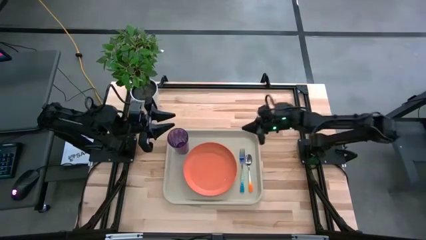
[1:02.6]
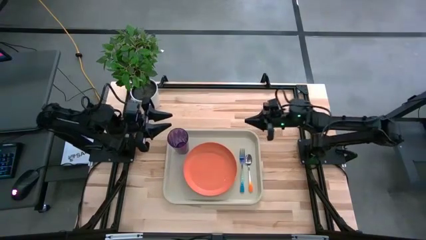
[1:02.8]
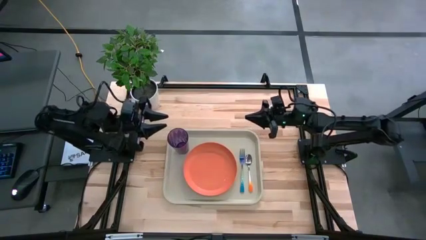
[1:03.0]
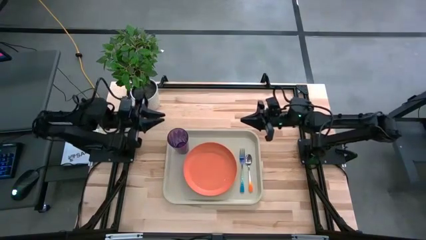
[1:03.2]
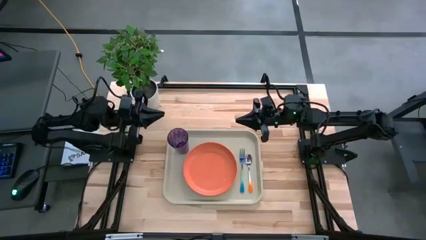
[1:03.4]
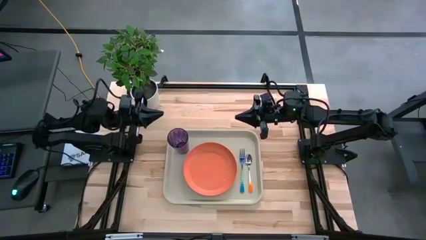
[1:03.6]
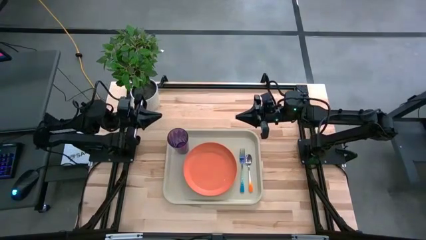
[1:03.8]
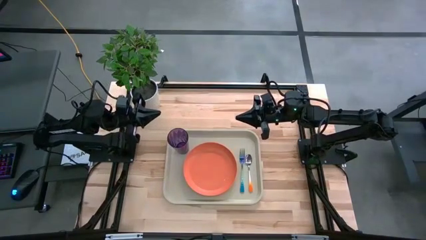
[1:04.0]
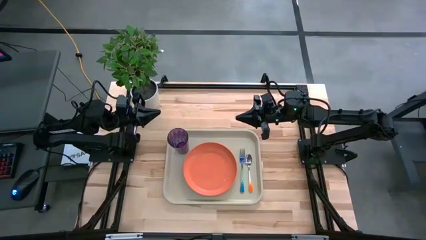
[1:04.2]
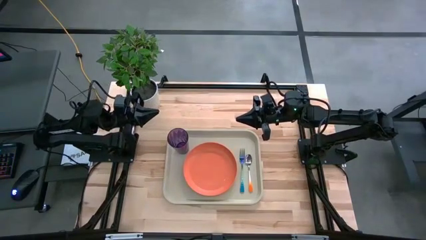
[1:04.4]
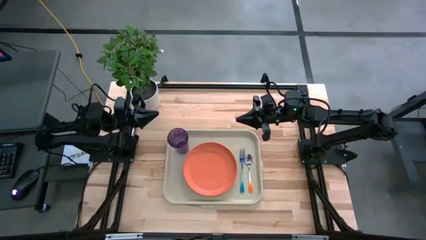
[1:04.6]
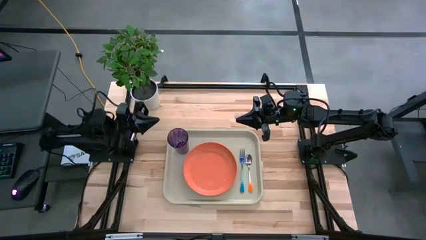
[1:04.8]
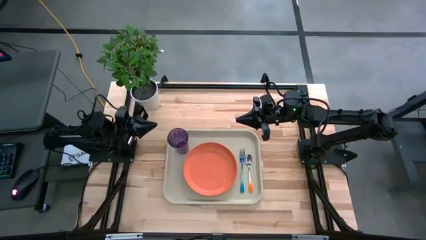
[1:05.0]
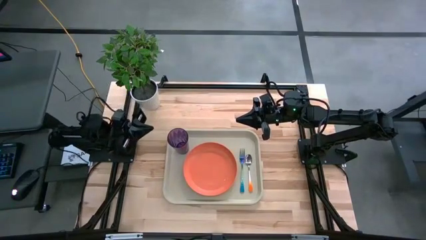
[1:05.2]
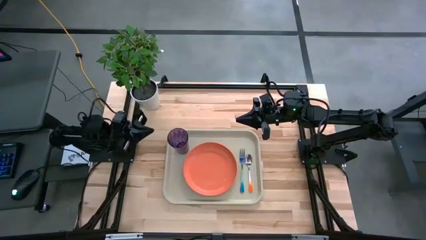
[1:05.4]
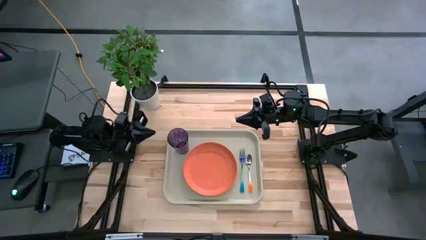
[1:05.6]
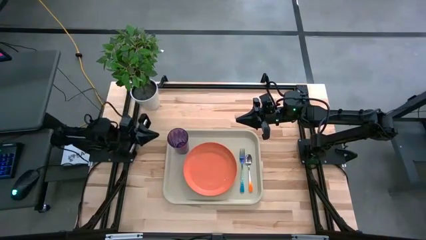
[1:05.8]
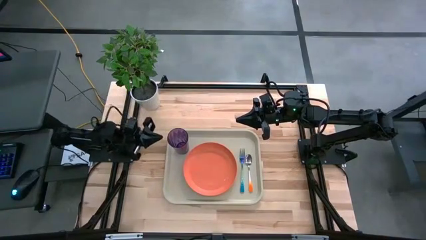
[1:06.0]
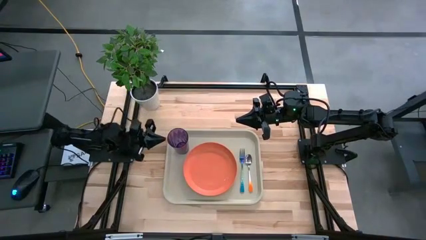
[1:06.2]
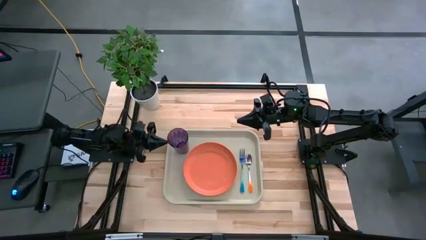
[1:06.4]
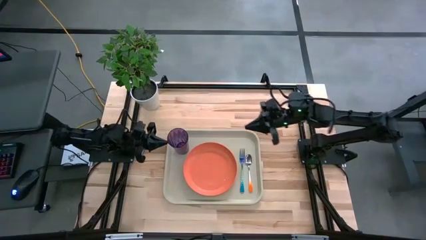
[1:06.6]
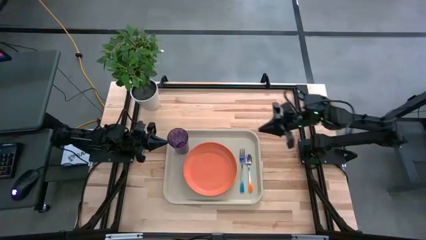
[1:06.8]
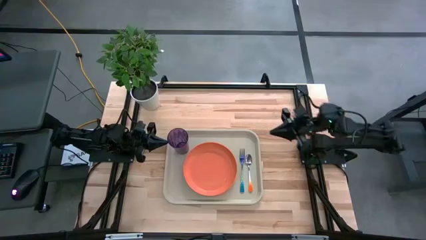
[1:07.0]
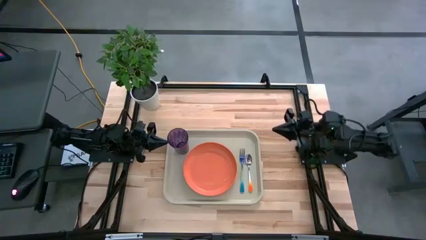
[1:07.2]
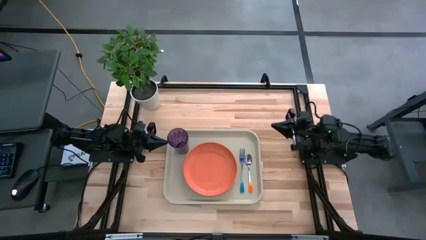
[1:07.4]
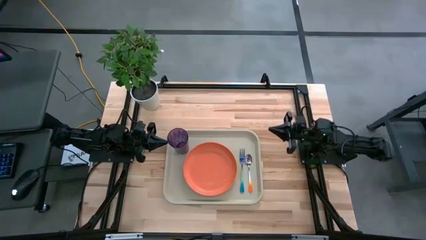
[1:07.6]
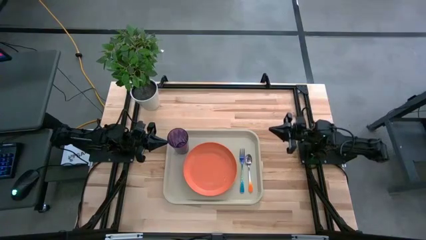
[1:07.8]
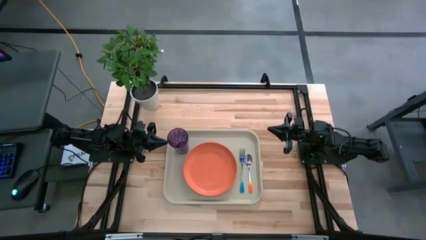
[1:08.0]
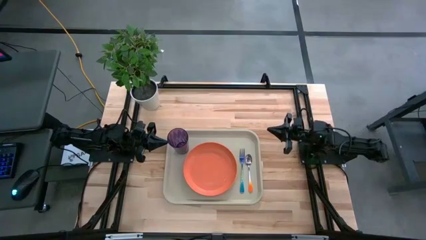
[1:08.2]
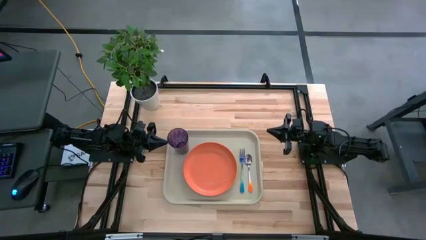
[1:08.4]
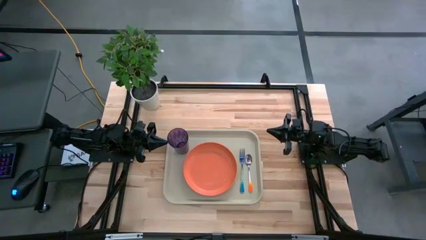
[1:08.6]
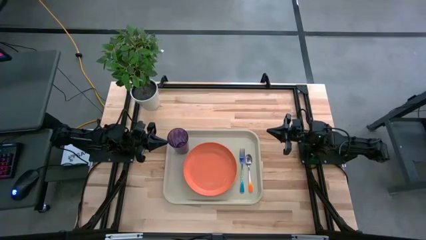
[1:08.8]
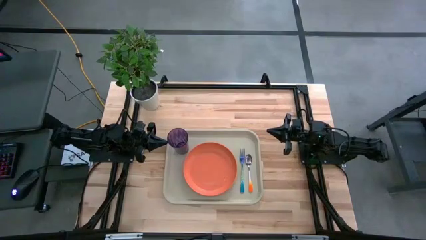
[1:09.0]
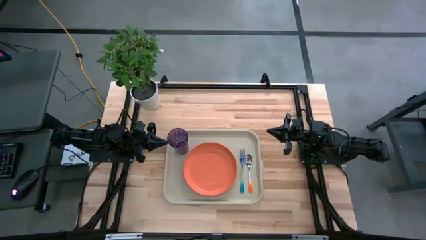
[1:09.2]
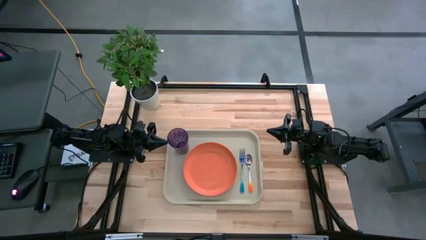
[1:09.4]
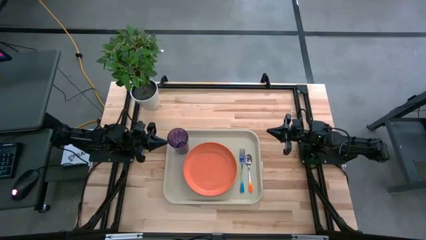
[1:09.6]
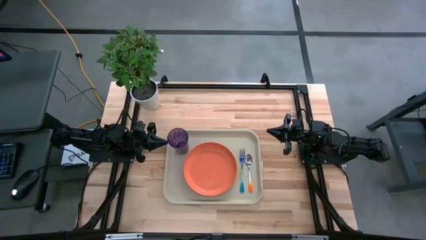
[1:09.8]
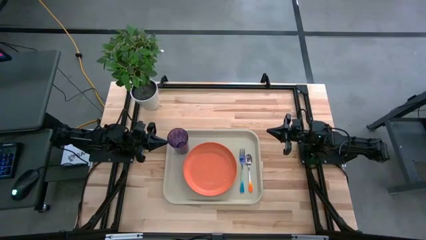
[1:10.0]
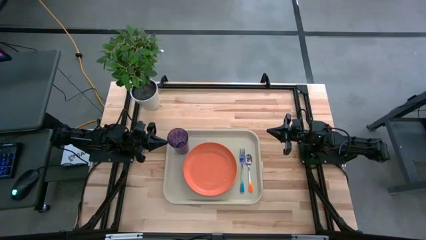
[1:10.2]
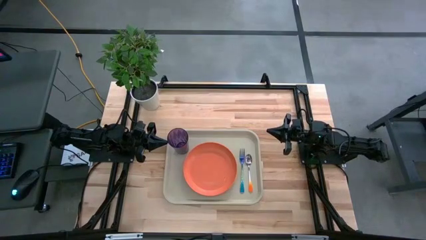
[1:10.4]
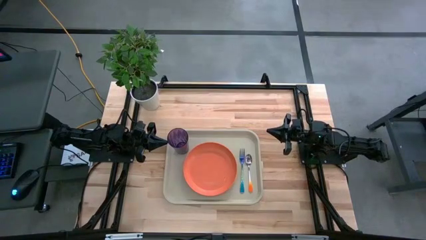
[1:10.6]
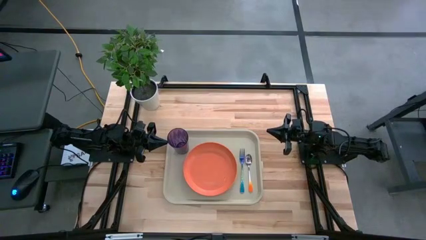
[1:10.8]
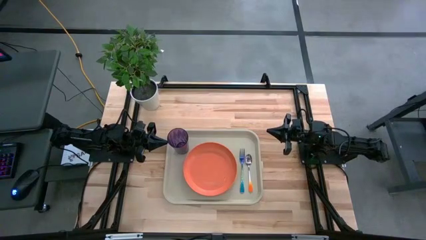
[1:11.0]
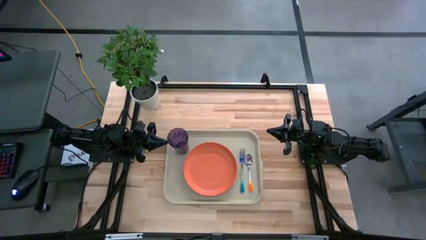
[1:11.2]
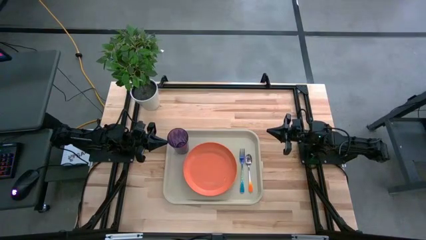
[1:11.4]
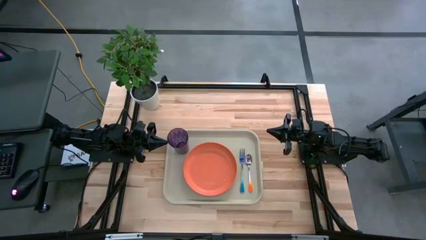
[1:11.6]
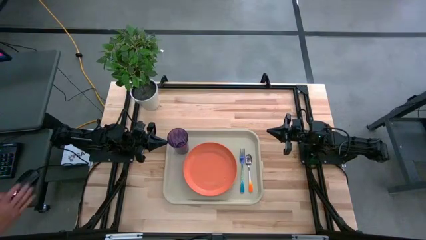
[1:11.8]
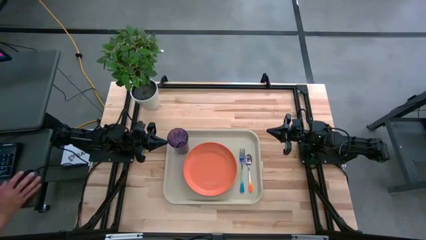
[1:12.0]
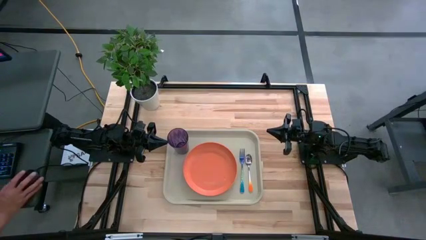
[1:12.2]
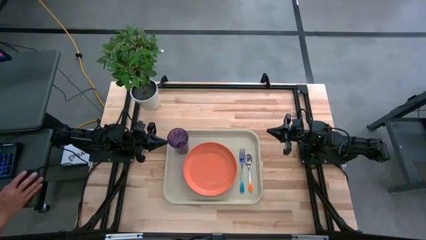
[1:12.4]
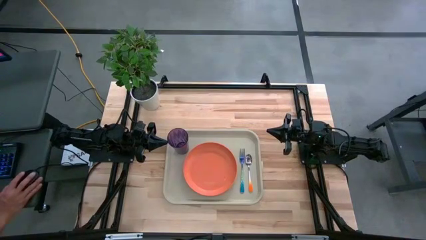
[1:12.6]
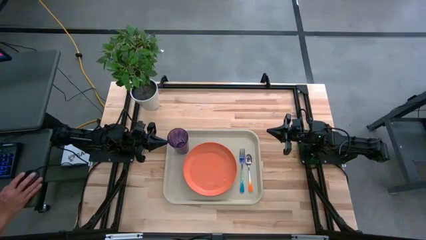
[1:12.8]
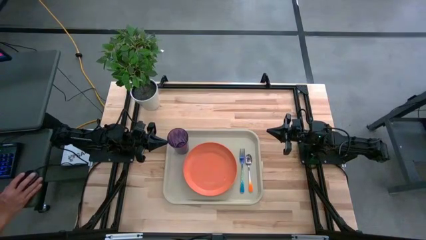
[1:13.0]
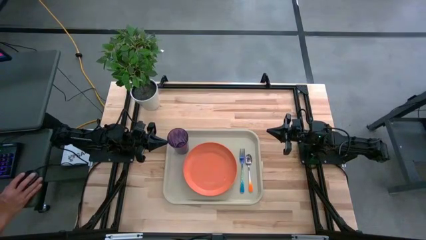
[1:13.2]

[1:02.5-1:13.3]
Task: Pick and place plate/cup/fork/spoon on tray
Return to Home Position

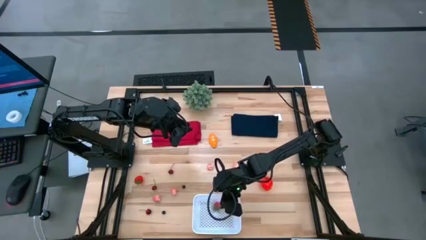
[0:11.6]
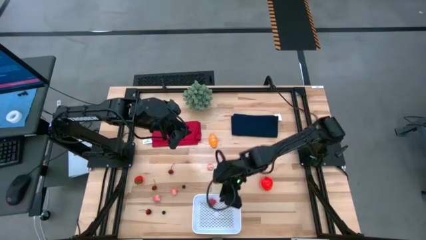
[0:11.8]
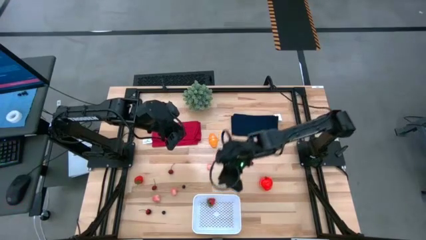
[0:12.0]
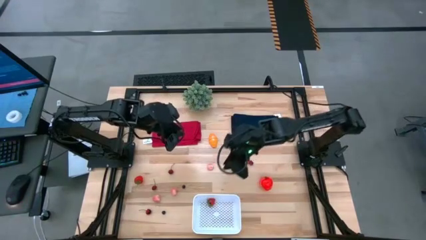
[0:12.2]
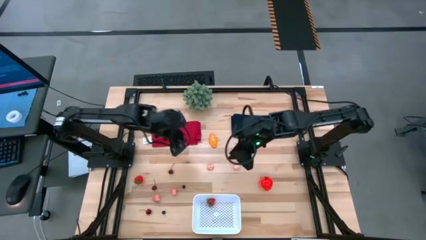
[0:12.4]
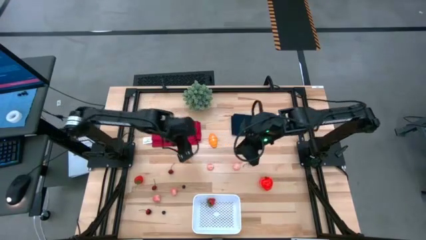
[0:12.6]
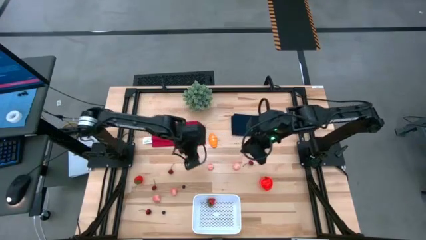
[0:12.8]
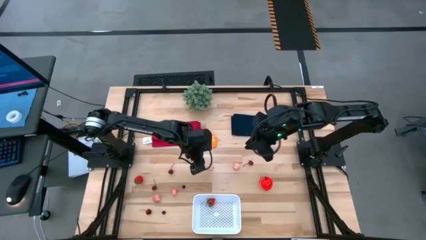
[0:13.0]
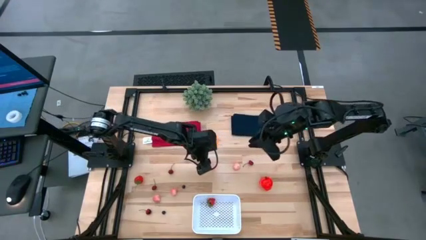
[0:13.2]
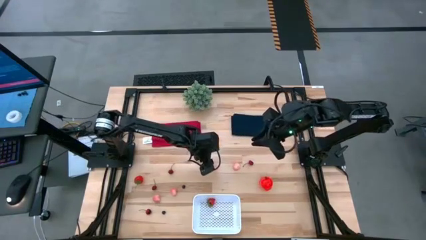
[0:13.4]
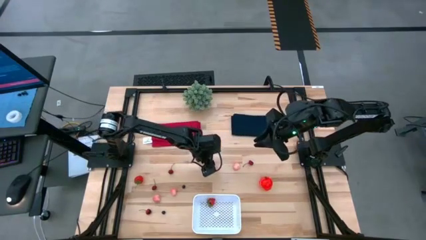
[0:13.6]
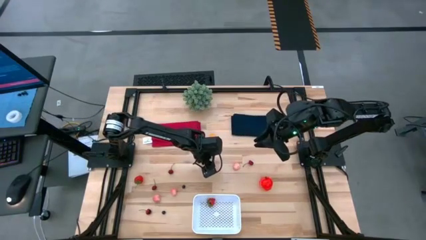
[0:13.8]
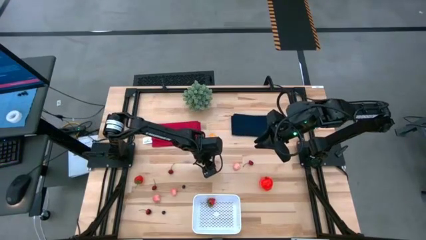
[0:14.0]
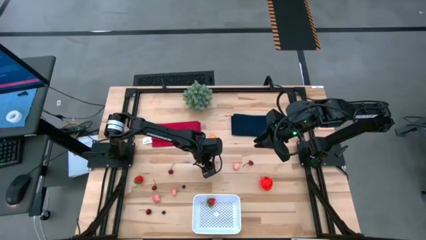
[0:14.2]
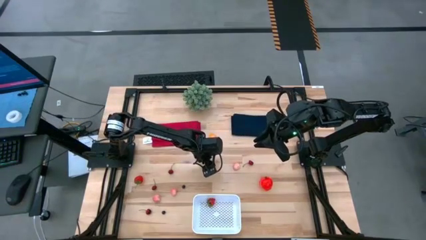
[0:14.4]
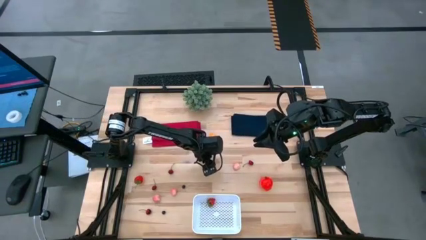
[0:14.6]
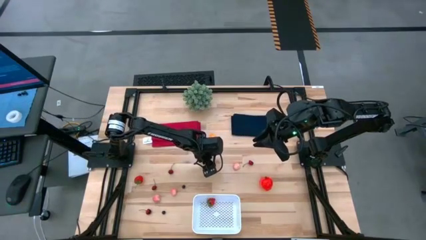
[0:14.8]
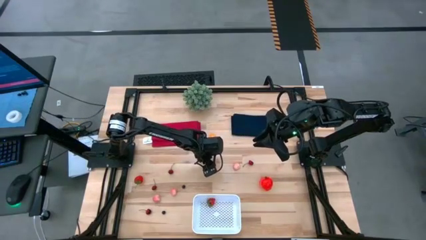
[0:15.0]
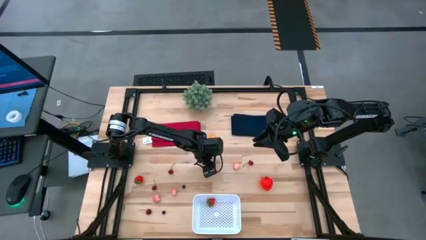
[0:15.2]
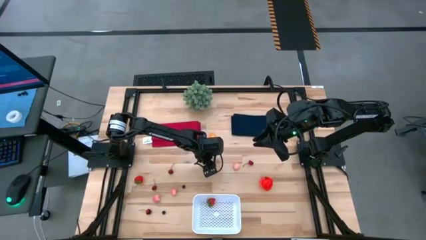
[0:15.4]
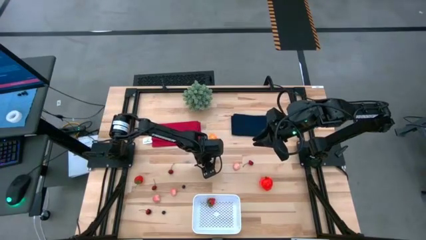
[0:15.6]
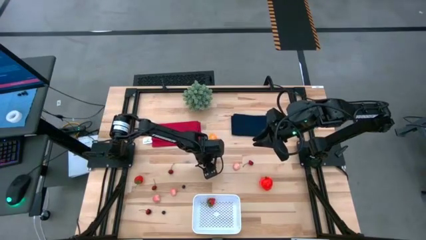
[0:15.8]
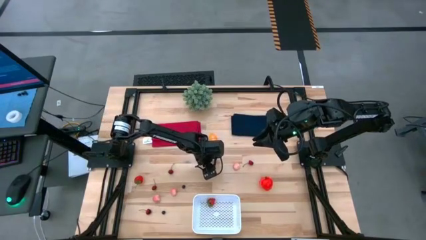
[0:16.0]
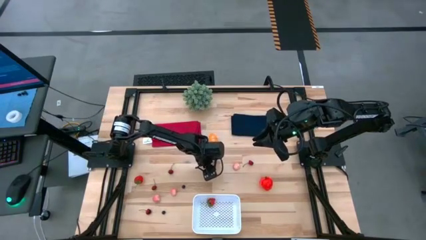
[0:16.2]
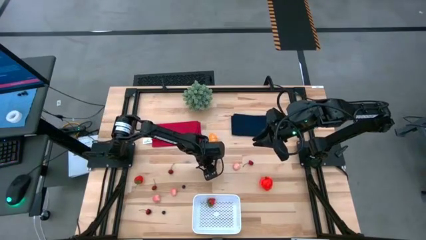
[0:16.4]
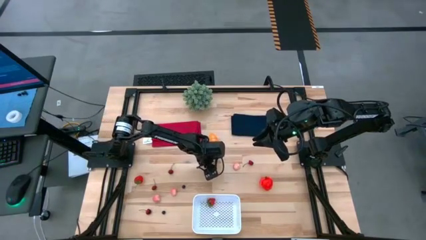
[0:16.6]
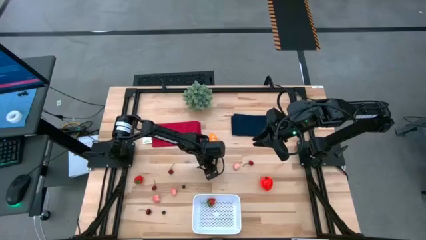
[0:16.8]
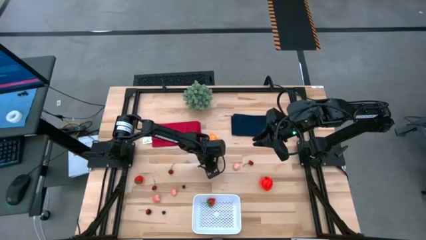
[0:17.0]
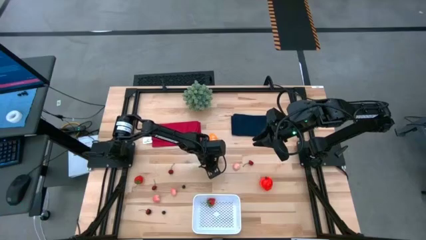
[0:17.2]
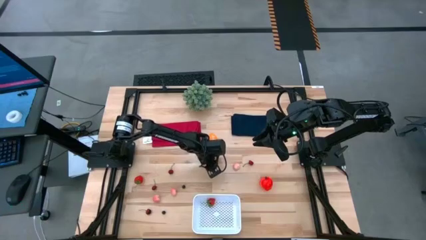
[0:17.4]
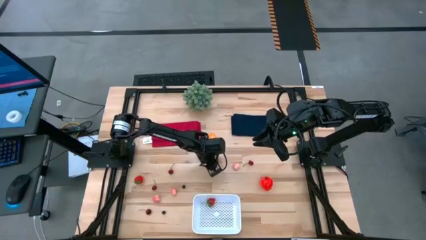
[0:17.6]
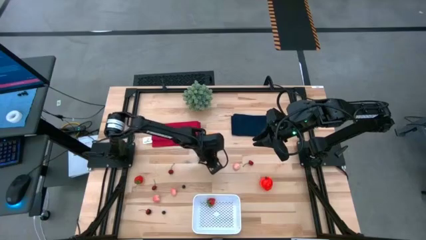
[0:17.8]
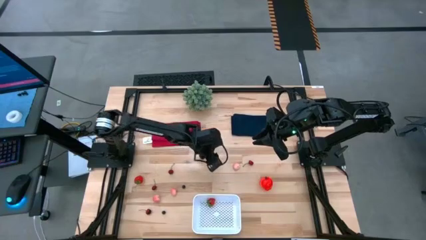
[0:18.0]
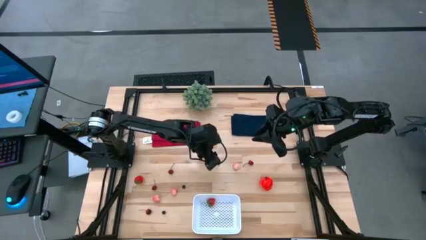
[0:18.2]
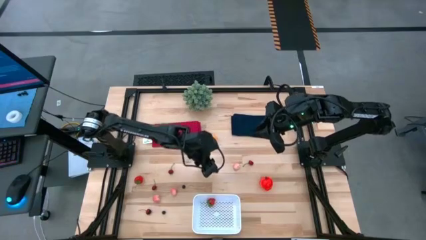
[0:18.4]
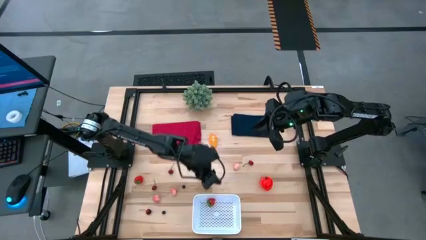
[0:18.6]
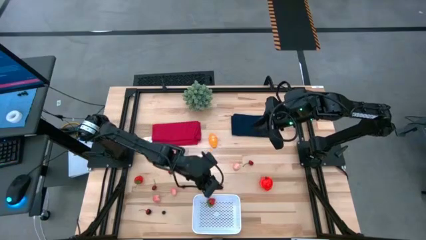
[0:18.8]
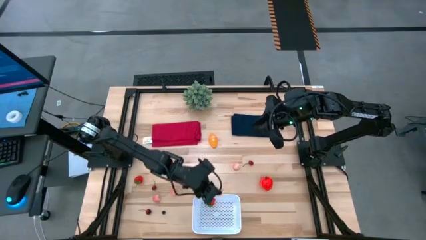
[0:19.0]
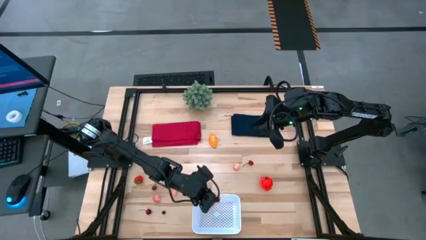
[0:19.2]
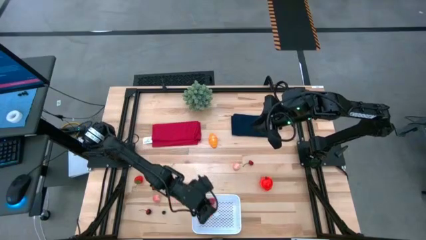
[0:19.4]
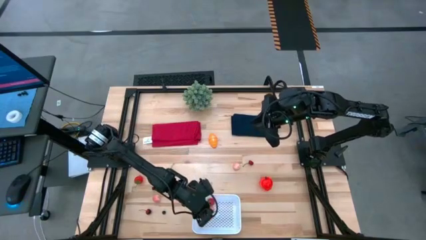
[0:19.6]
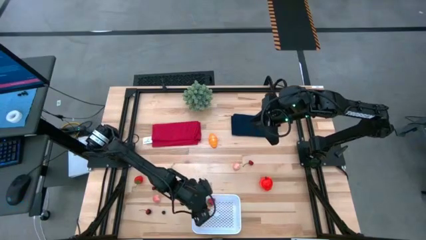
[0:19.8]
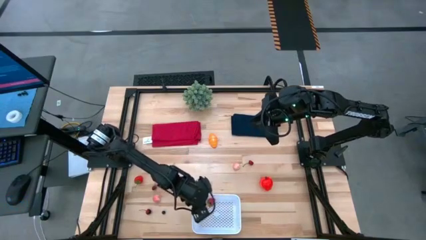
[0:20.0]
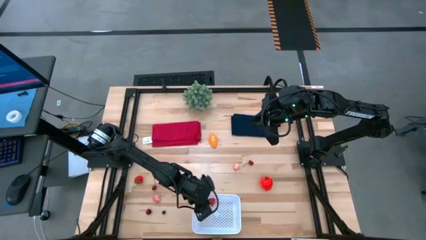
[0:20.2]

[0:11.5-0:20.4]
Task: Pick and placing Produce into tupperware
Put the peach into the white bin
